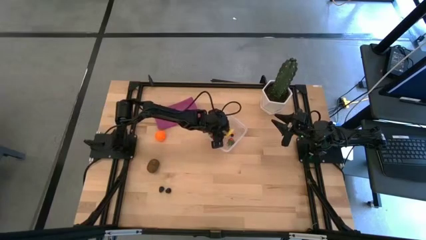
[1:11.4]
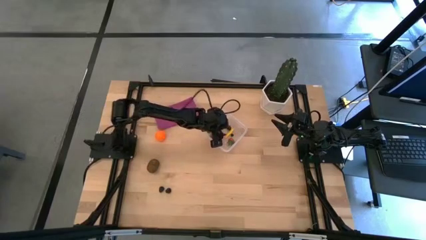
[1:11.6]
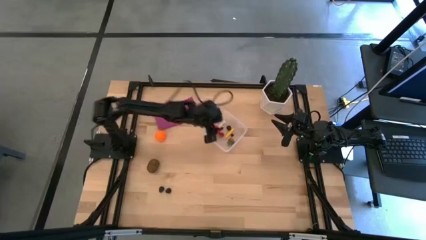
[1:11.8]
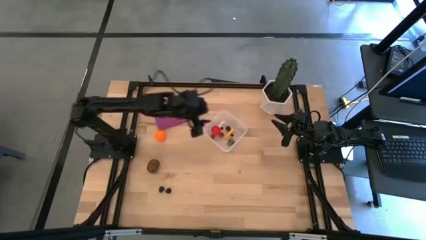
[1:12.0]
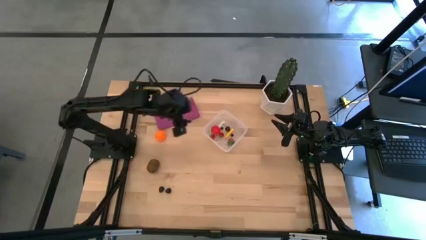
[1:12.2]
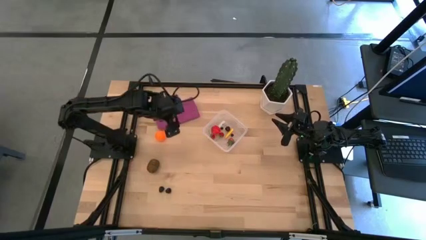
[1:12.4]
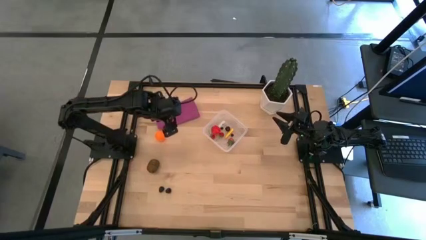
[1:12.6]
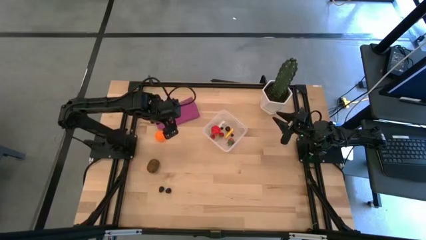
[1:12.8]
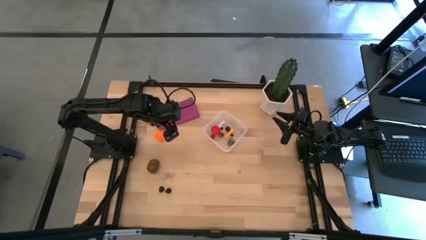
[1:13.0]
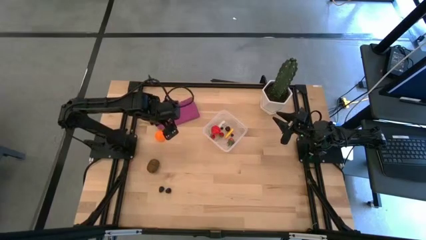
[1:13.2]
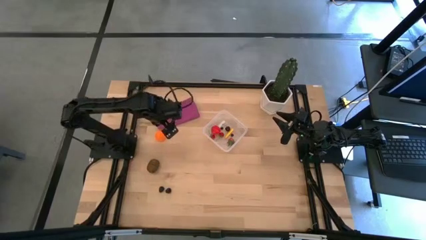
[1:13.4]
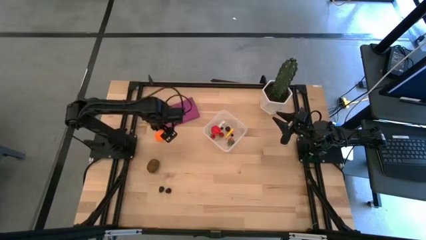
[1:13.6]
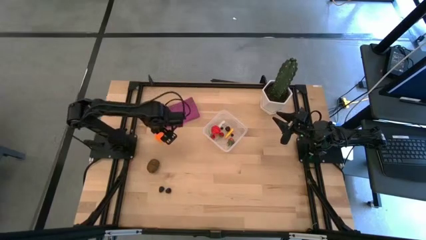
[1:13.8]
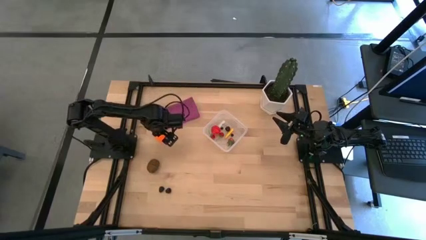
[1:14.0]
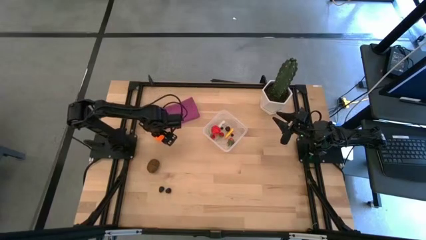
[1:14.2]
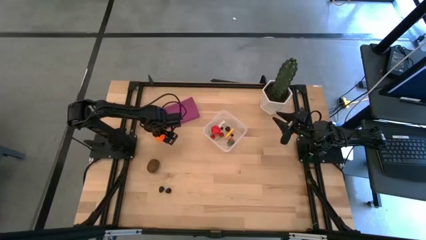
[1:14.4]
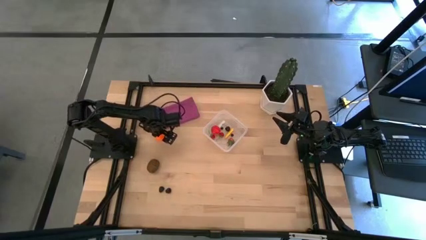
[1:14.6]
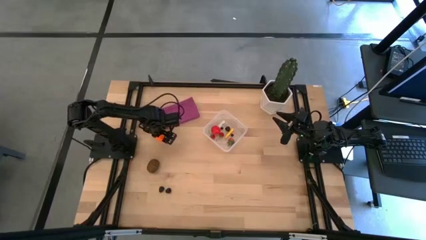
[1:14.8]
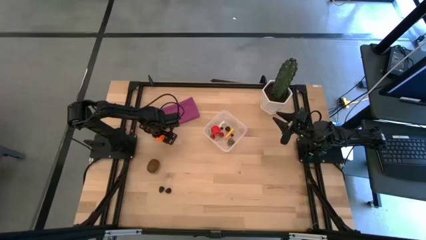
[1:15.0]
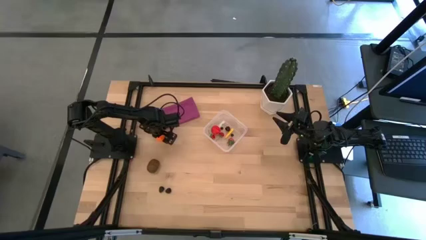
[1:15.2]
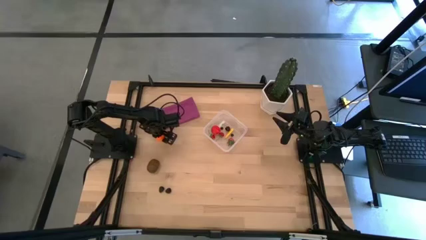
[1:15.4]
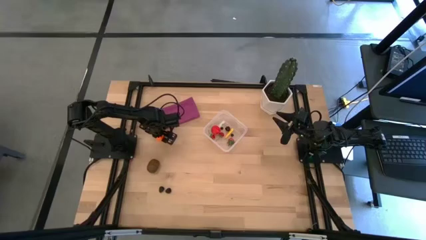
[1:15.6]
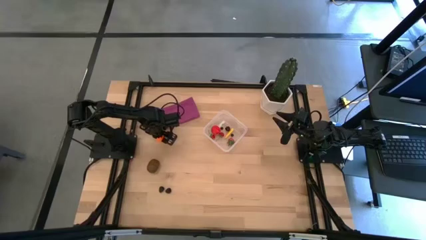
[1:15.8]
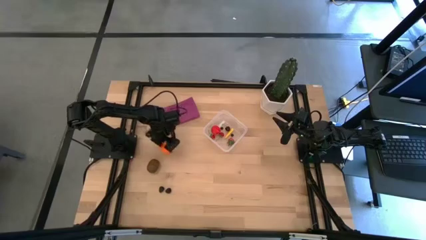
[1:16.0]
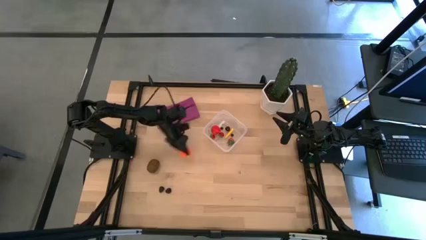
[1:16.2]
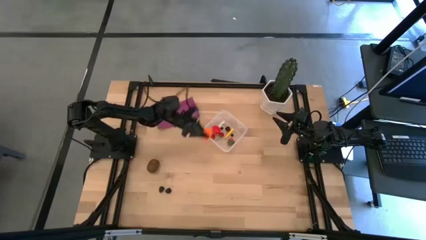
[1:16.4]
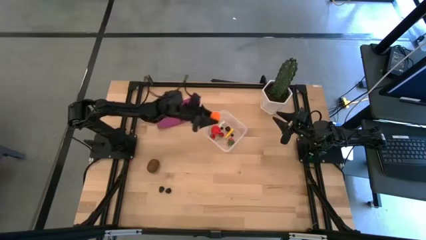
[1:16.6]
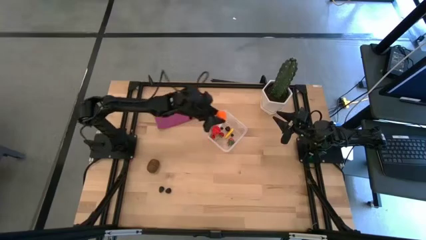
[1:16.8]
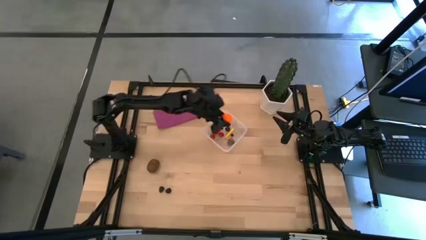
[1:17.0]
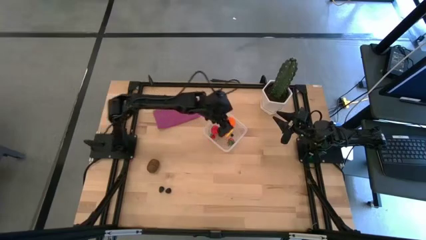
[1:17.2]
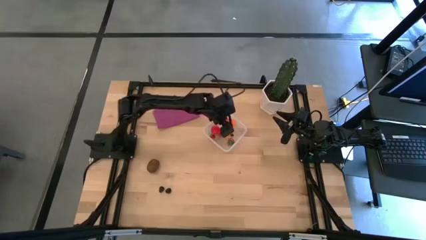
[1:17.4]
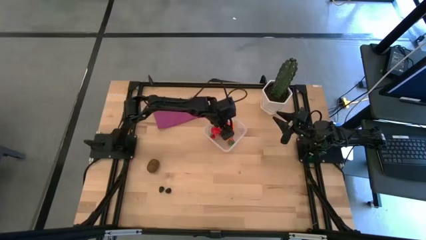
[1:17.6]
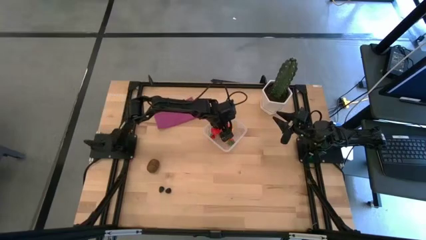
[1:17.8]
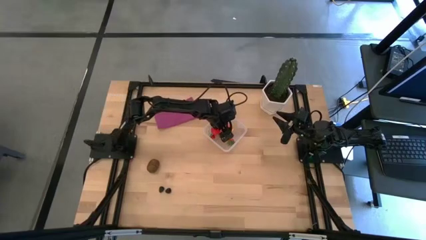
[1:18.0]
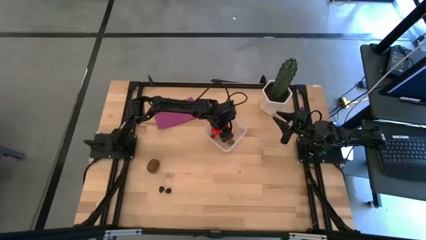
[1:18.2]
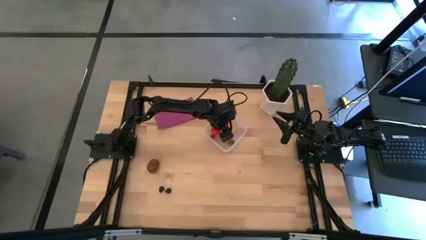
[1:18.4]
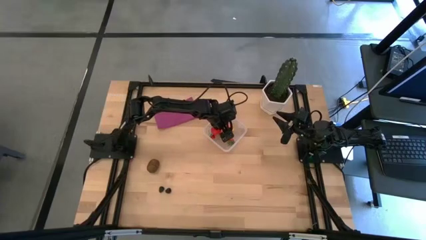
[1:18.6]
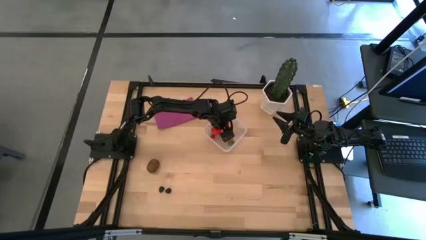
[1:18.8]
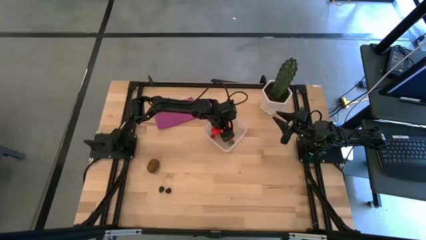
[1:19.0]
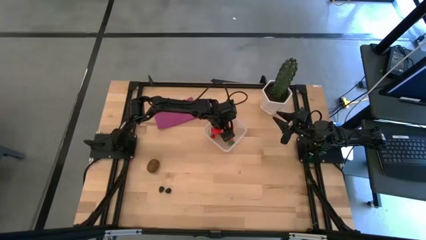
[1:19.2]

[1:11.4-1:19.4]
Task: Pick and placing Produce into tupperware
Put the orange pumpkin into the transparent container

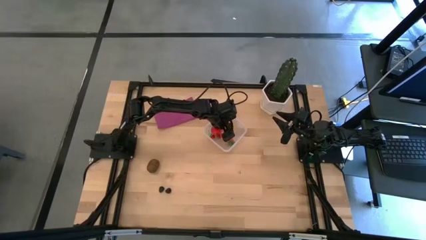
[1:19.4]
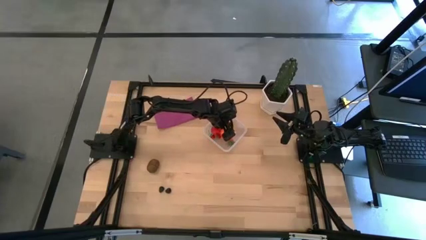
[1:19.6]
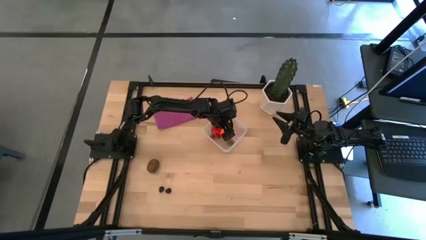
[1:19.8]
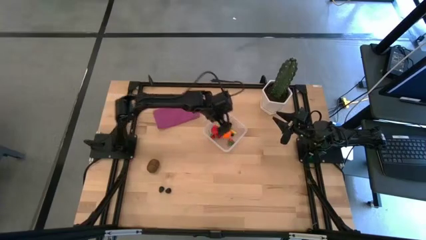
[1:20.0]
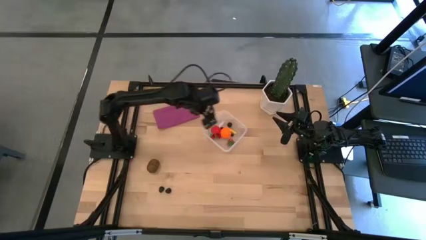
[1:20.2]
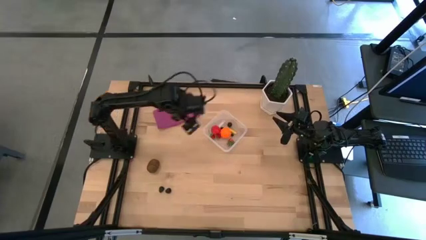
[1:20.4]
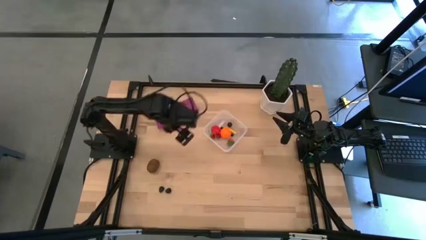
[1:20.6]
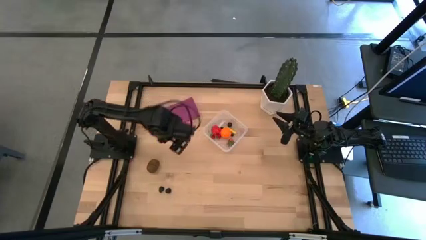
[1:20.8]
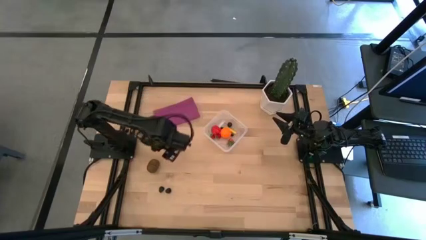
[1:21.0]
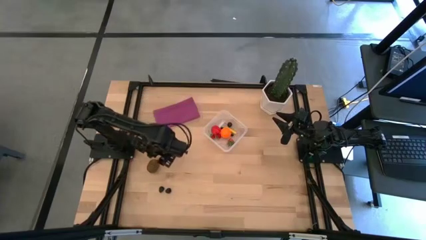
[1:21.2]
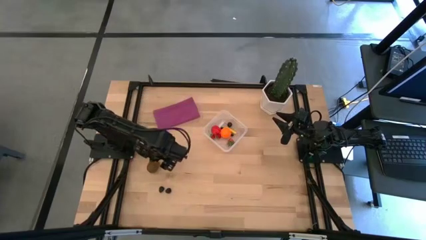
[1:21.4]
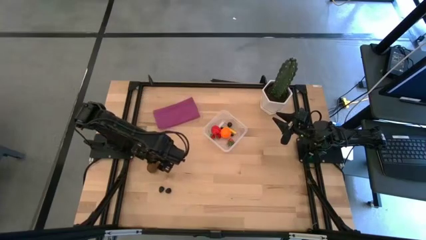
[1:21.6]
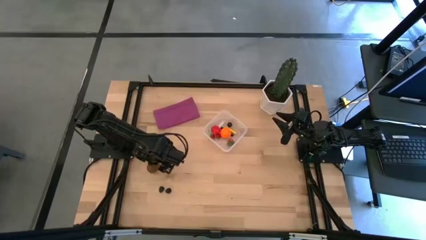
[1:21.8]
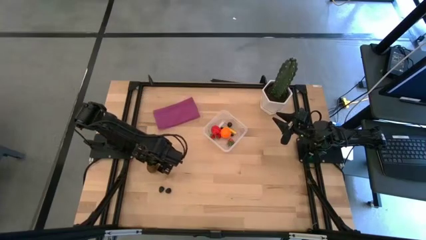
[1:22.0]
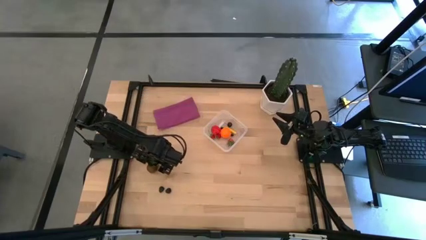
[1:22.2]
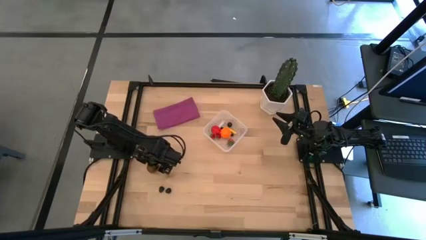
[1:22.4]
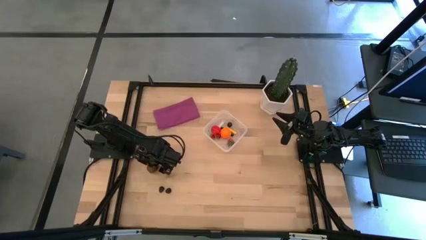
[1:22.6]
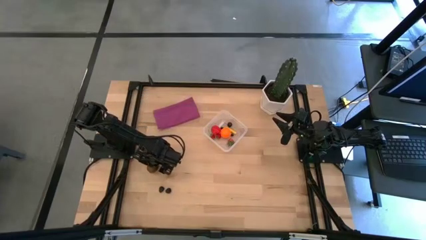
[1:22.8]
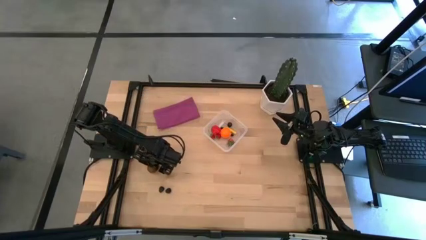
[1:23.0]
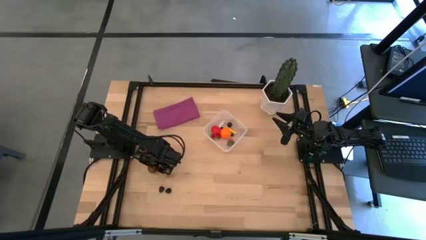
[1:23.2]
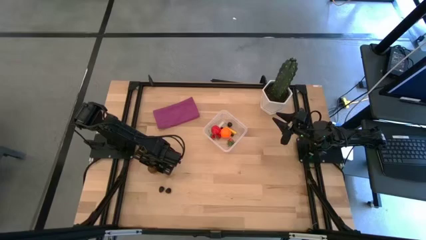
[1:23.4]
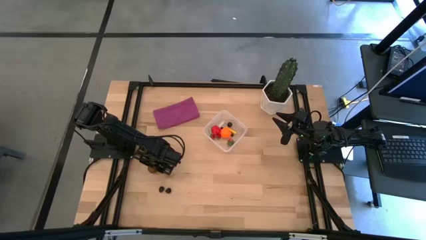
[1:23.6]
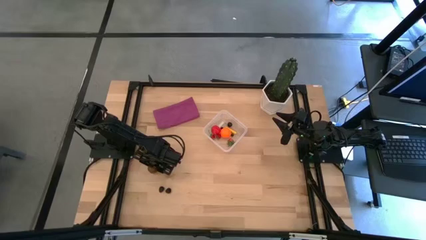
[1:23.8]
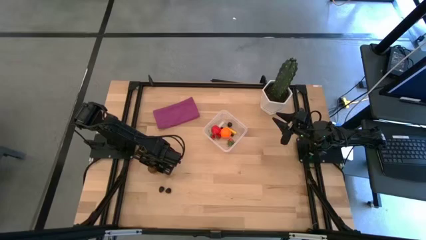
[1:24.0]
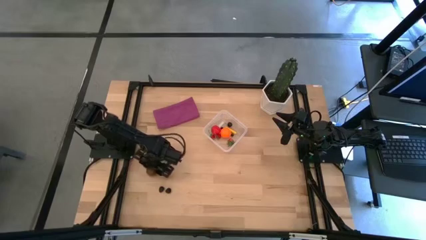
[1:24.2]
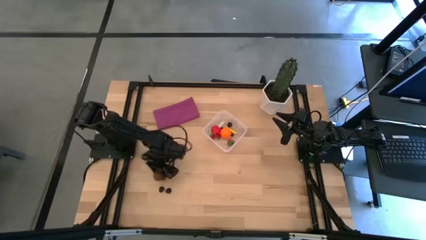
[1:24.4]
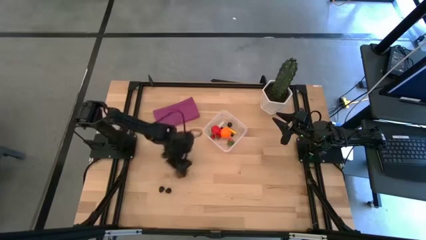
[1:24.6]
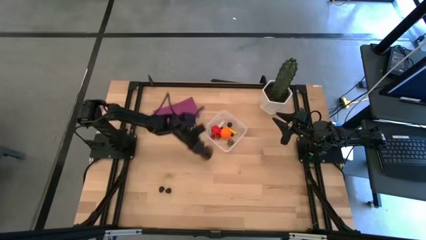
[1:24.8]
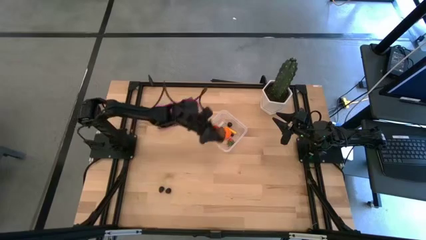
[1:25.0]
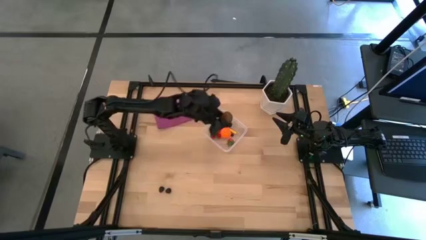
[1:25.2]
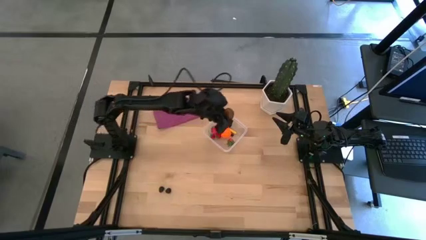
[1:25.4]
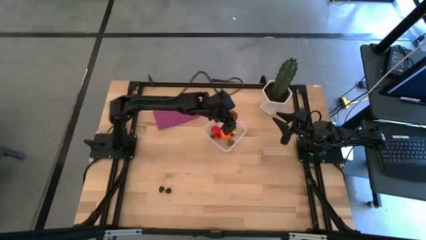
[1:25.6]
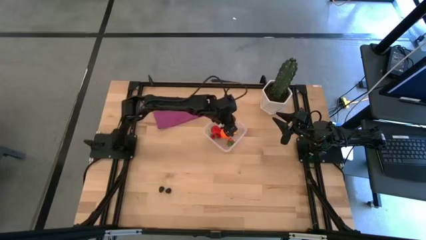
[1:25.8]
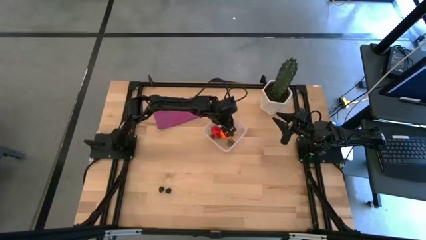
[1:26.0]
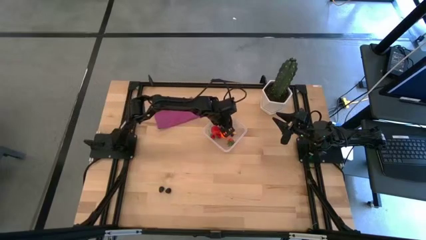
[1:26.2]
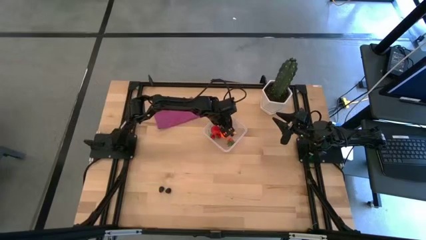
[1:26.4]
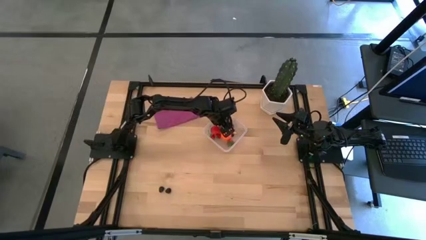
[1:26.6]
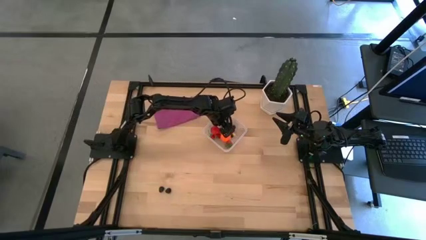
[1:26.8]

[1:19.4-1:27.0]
Put the brown kiwi into the transparent container
